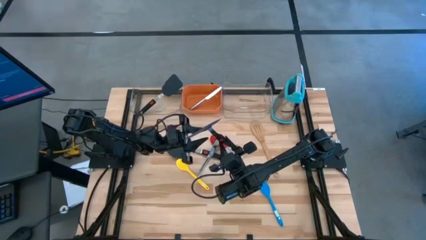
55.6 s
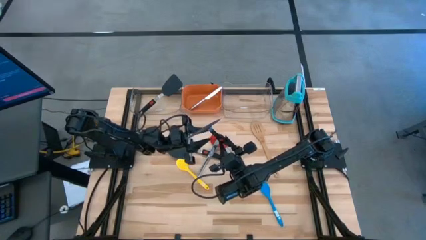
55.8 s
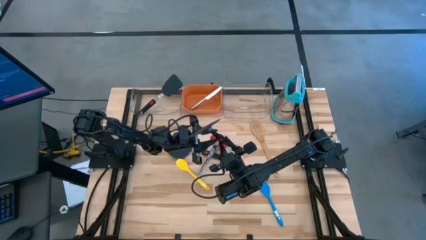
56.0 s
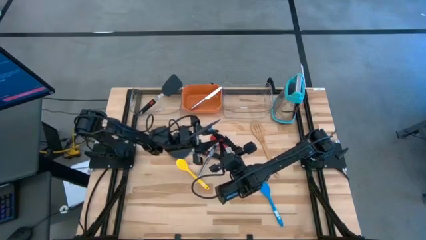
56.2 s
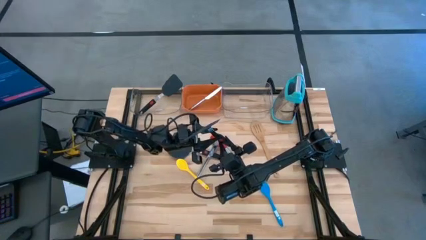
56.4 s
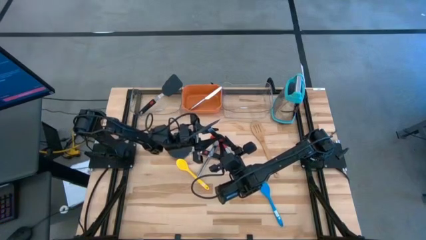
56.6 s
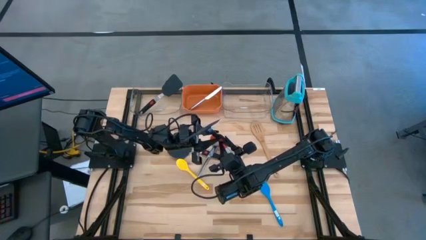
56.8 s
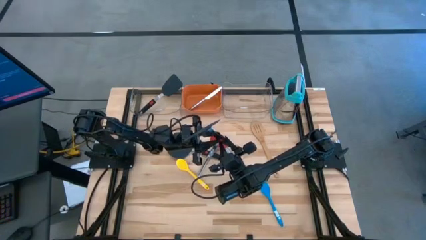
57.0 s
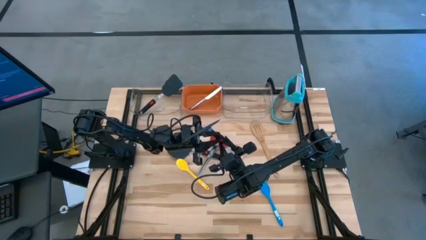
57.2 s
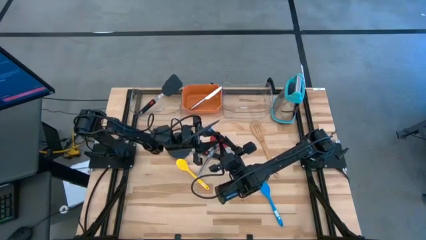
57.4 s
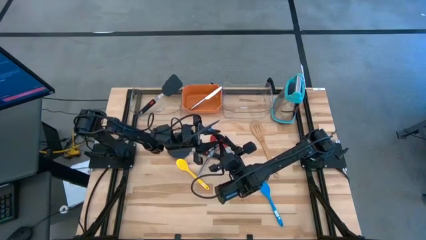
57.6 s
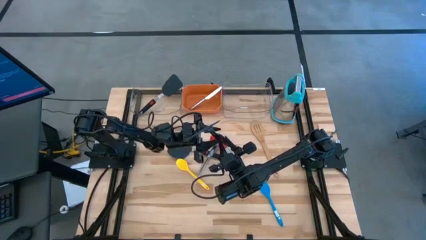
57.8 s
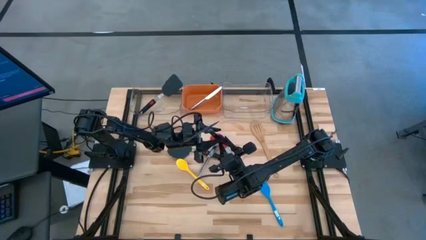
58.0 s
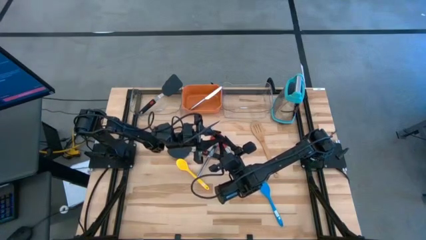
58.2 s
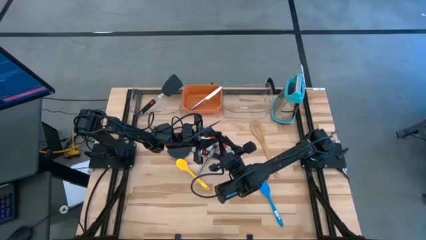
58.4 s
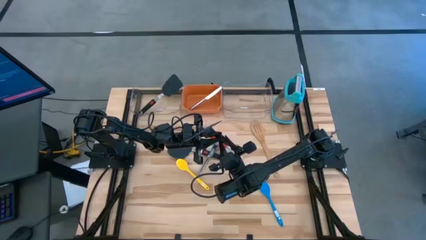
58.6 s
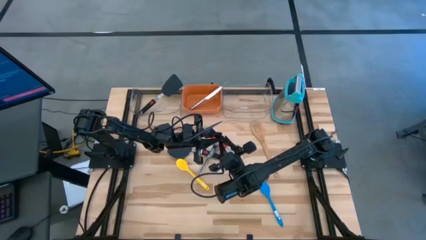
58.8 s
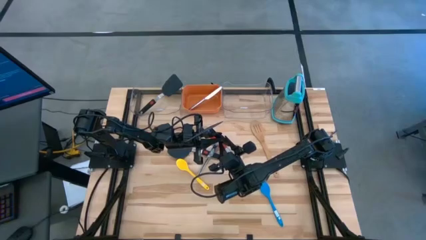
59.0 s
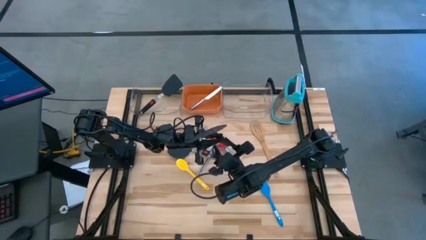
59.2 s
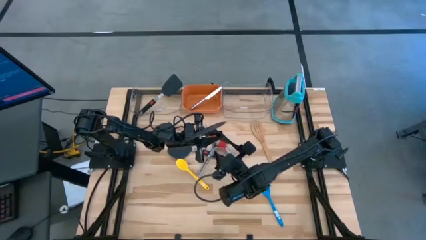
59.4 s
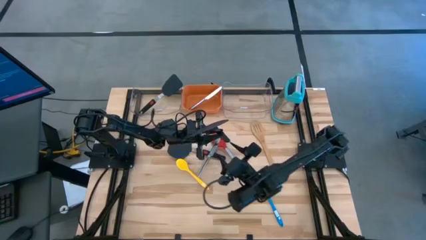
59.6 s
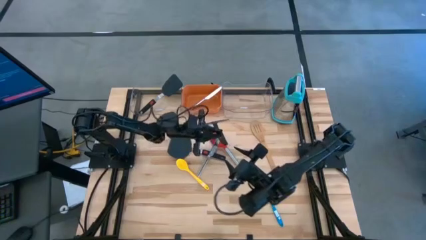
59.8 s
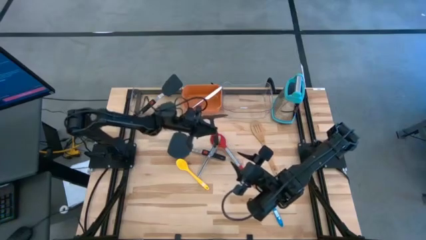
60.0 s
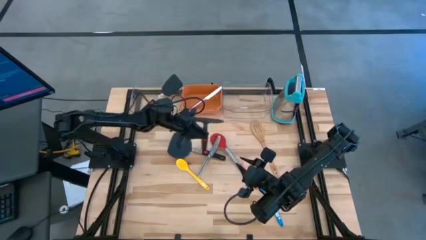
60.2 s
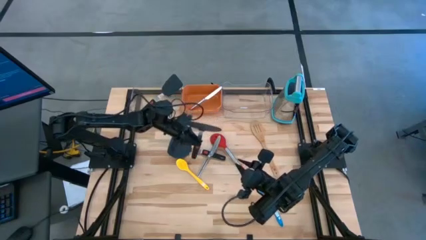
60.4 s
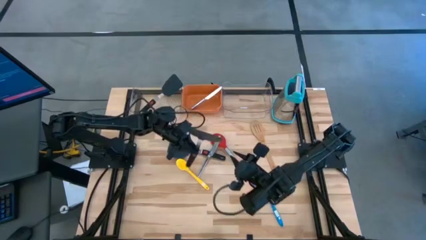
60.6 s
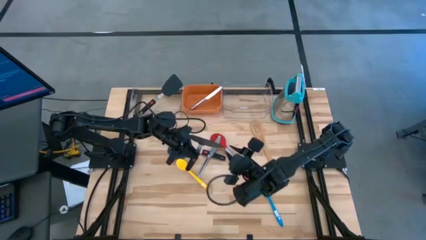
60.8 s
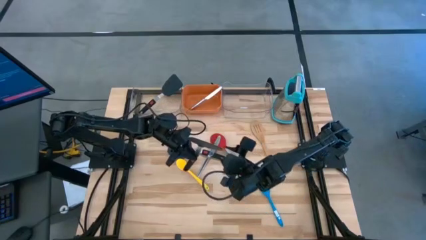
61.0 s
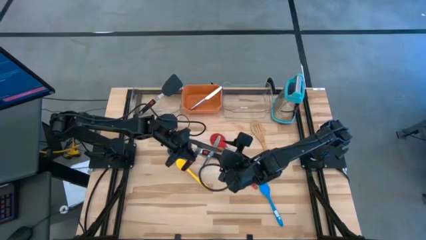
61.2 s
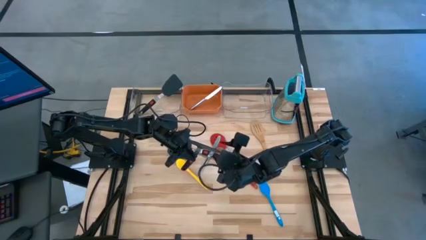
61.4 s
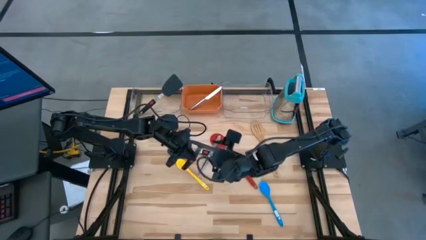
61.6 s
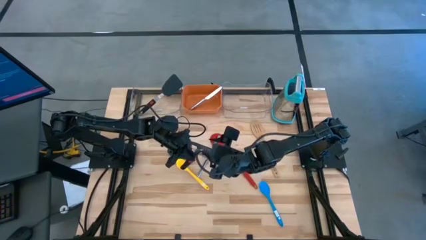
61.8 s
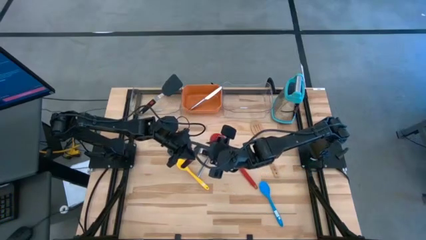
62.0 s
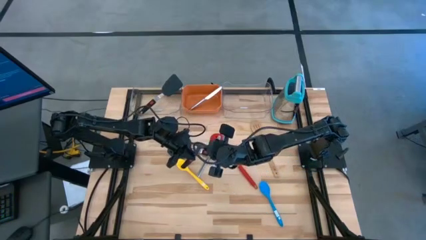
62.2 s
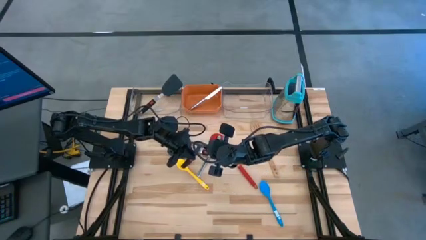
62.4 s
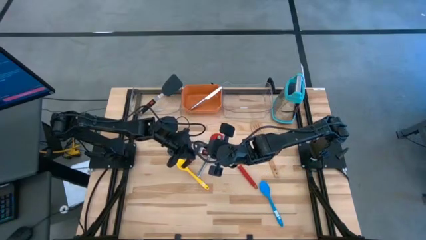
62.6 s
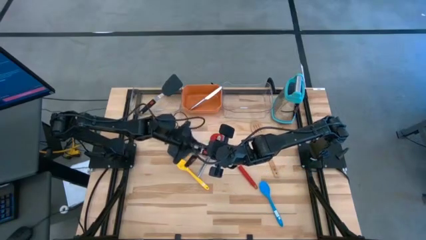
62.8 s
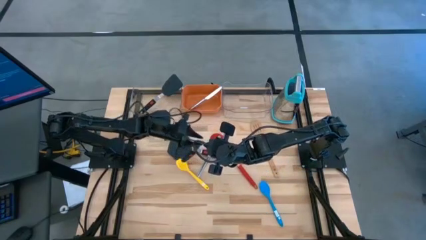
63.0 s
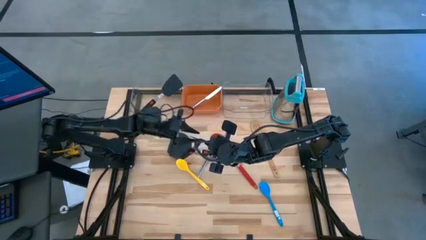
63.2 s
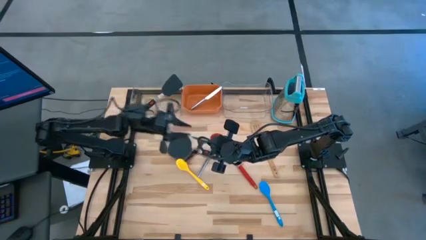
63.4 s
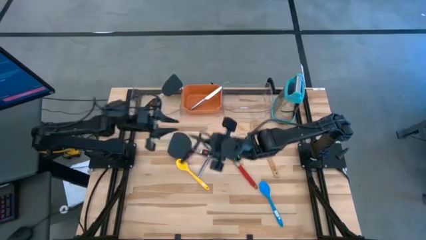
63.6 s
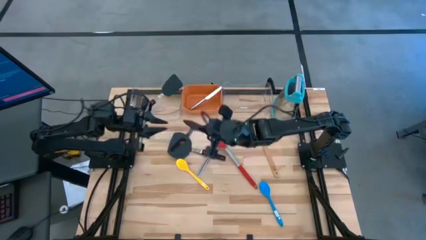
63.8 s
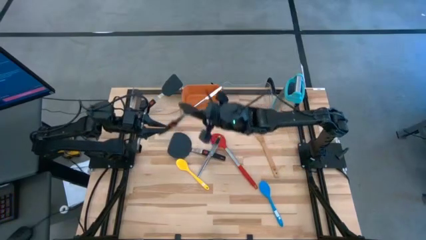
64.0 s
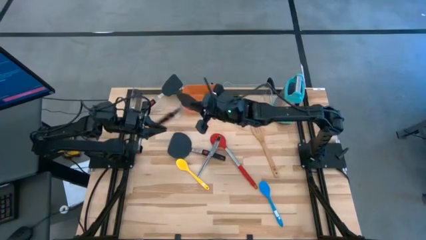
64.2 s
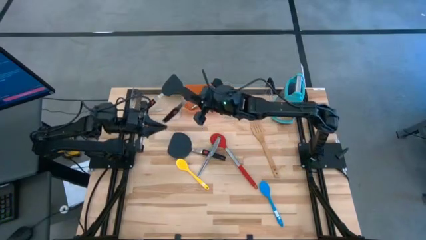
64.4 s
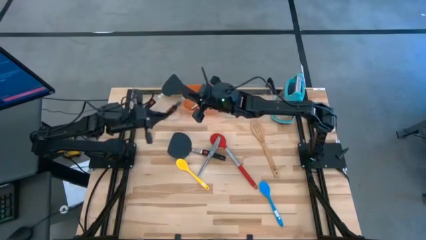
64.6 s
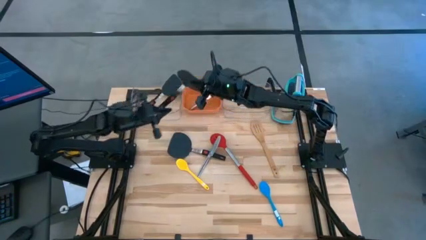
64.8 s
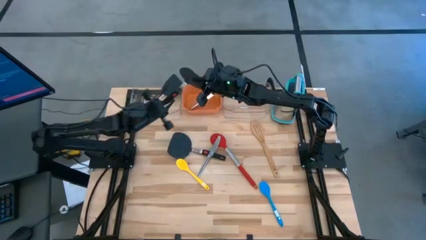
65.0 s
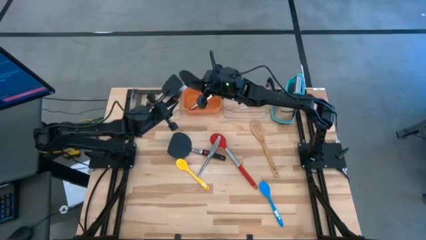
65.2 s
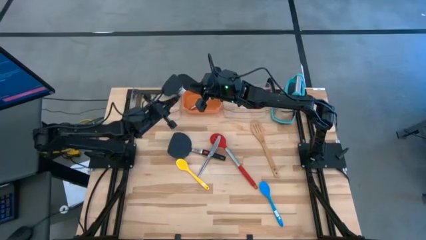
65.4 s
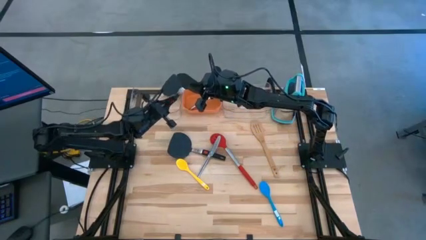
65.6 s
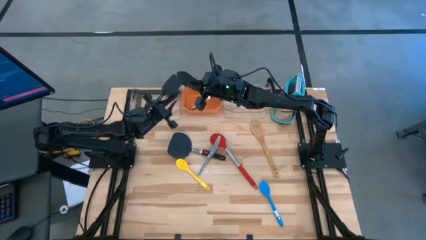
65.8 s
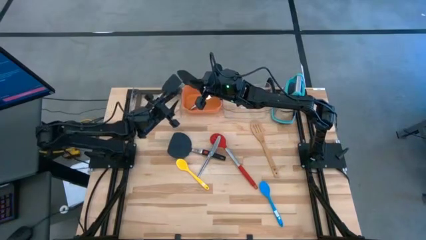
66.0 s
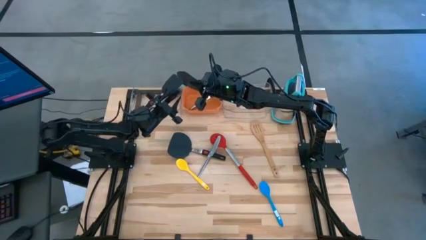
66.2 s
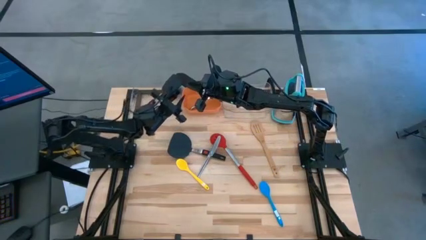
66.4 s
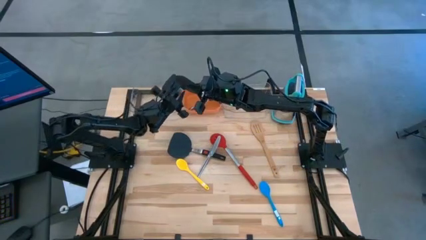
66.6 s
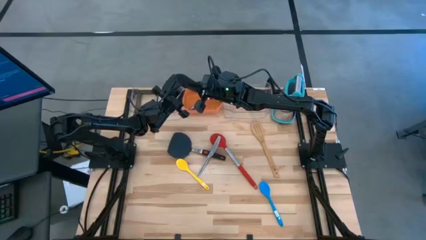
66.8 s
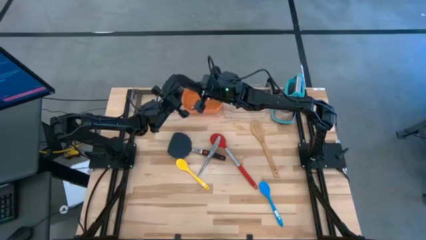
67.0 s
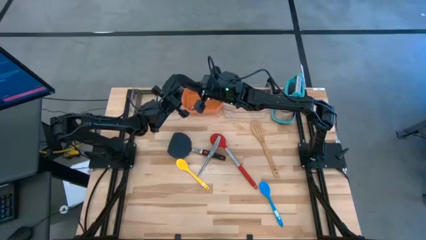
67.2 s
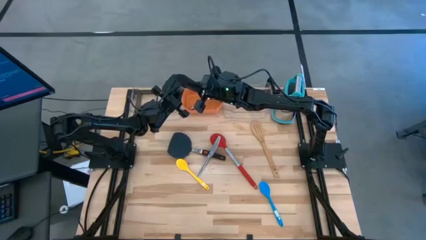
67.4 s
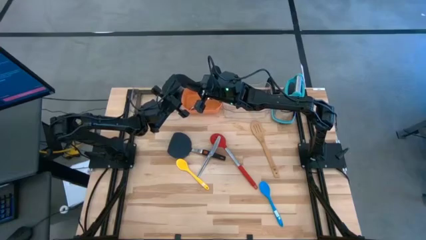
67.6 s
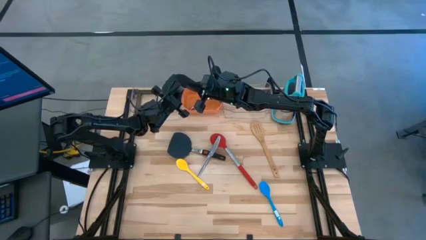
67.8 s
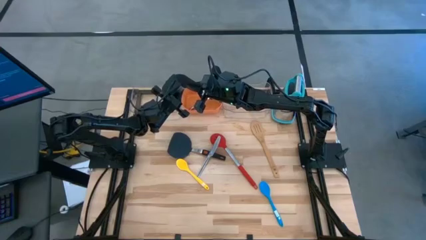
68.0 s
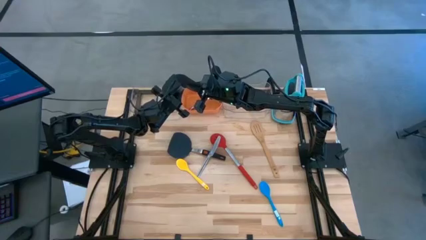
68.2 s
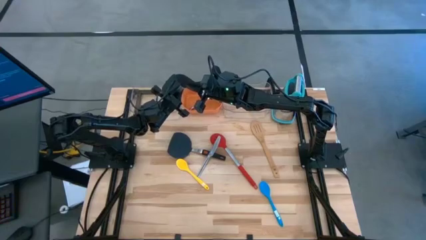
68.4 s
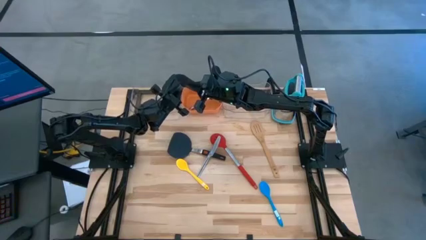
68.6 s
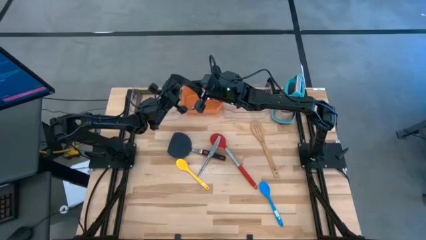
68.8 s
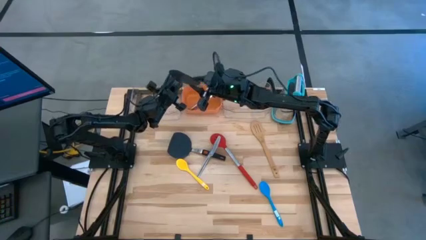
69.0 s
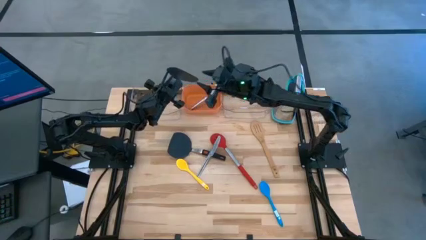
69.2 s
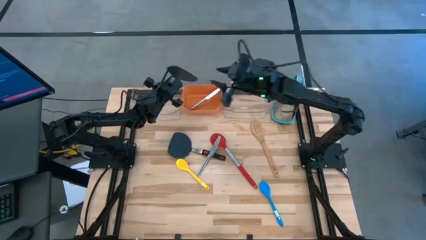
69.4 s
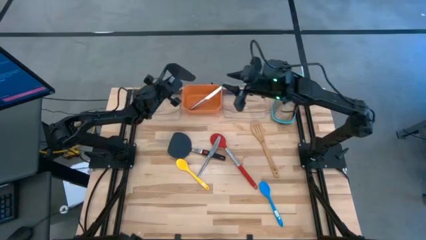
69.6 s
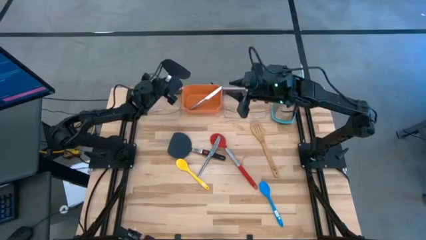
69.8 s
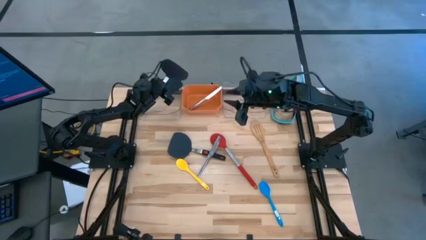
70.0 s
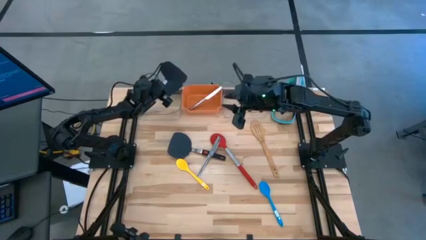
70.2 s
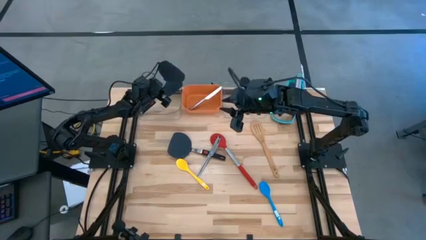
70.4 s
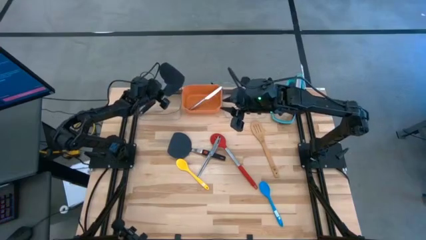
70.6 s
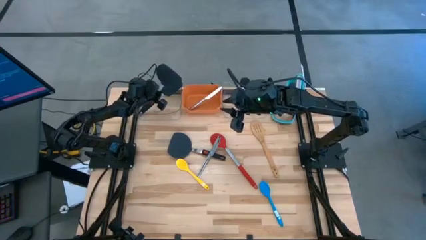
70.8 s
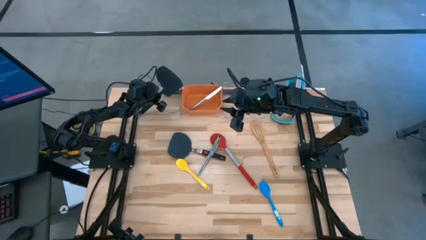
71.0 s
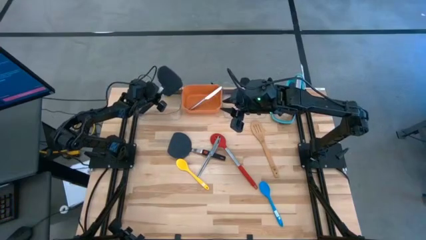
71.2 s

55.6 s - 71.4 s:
Task: Pick & Place Kitchen Items
Put the black spatula into the left transparent bin
